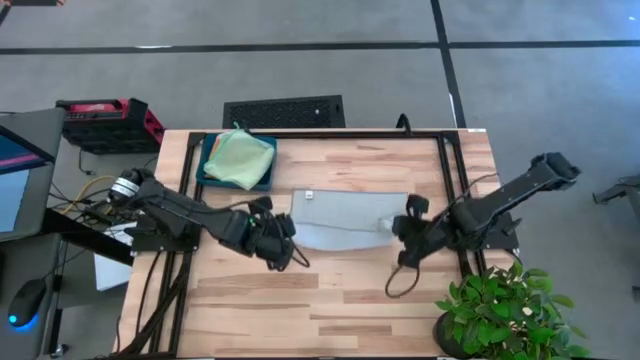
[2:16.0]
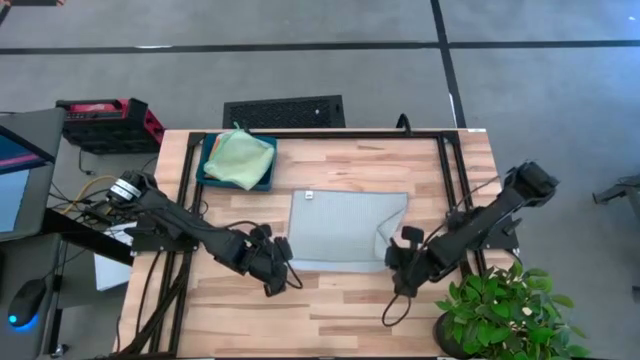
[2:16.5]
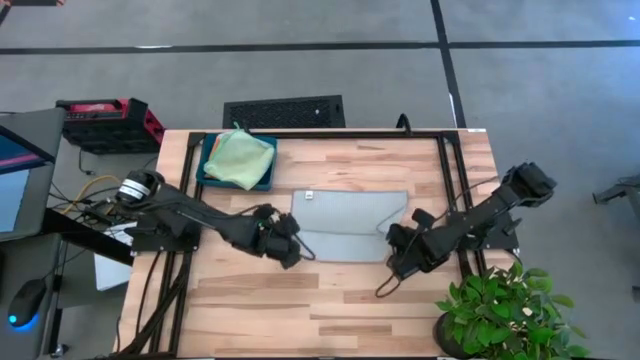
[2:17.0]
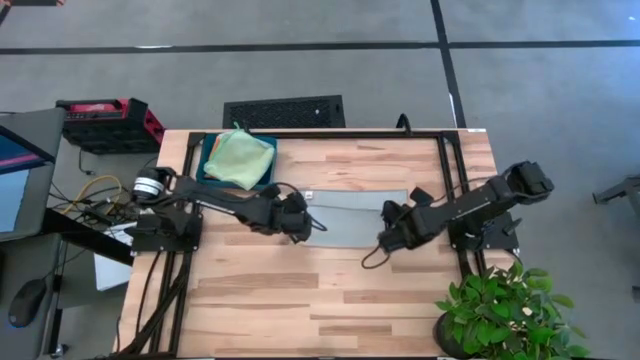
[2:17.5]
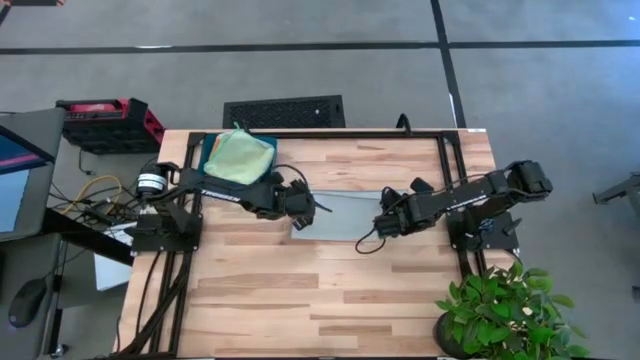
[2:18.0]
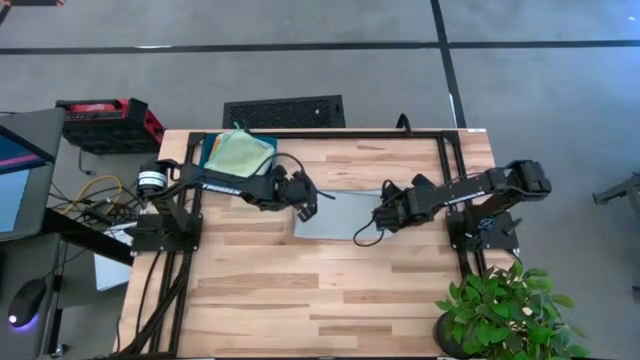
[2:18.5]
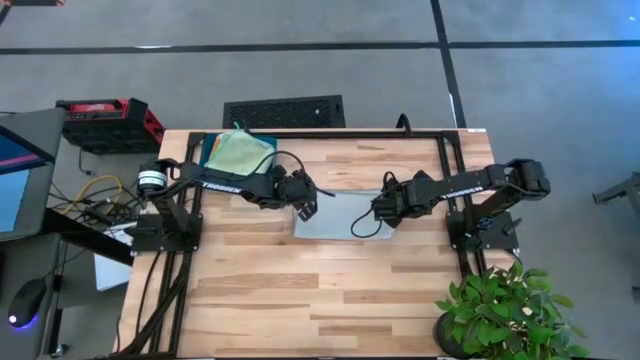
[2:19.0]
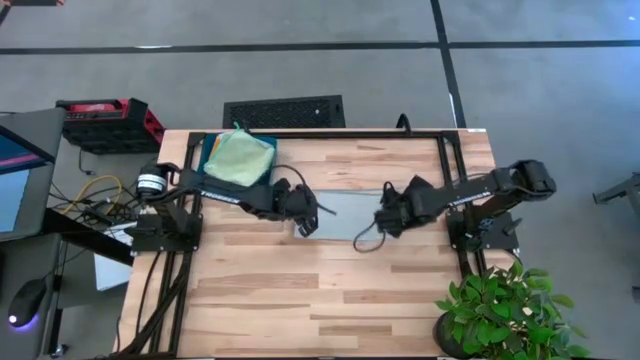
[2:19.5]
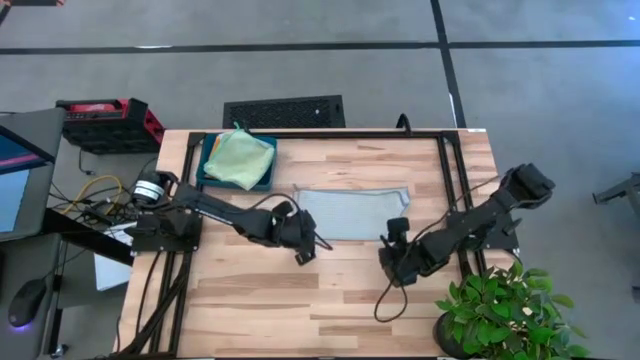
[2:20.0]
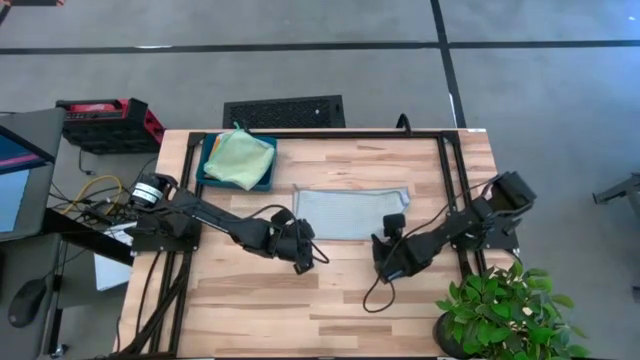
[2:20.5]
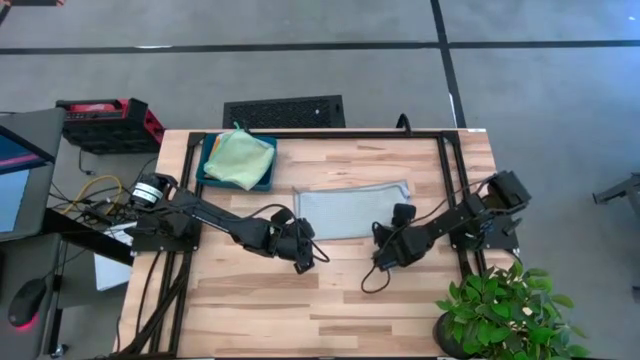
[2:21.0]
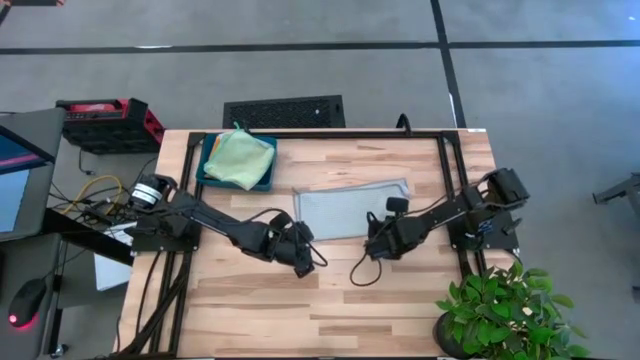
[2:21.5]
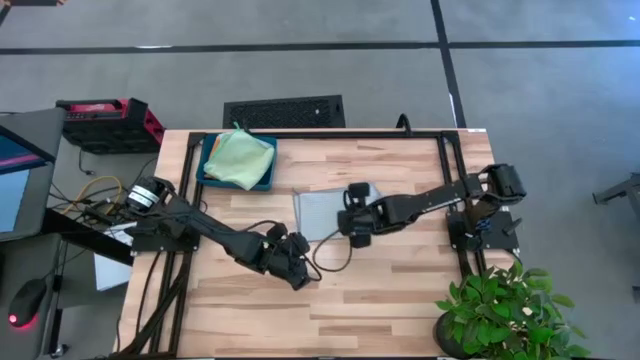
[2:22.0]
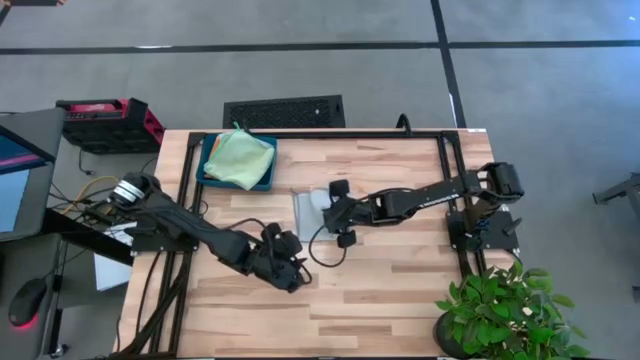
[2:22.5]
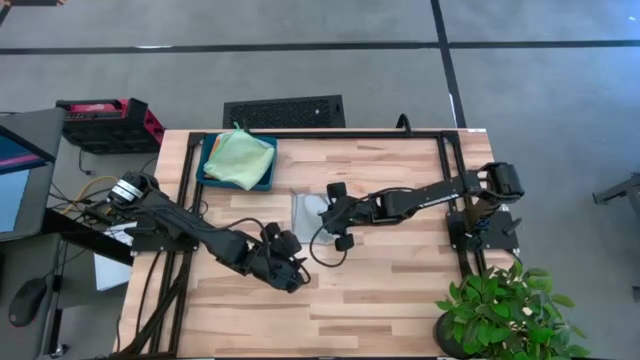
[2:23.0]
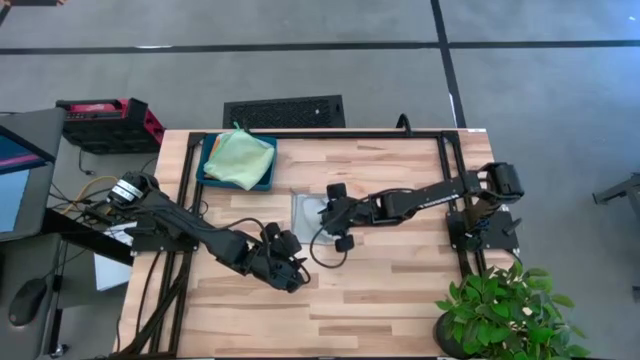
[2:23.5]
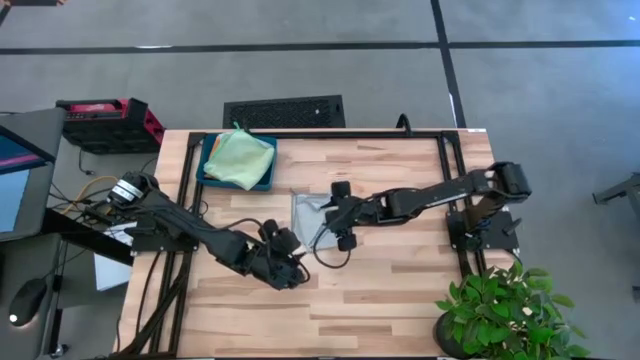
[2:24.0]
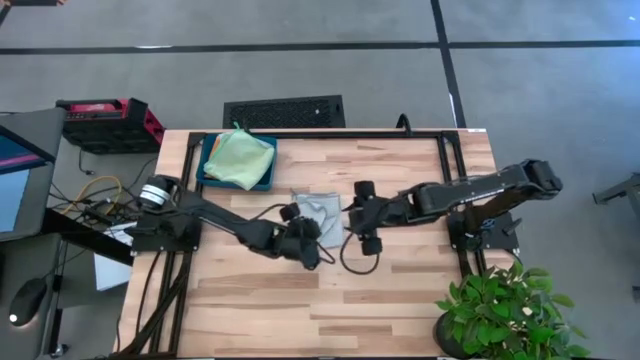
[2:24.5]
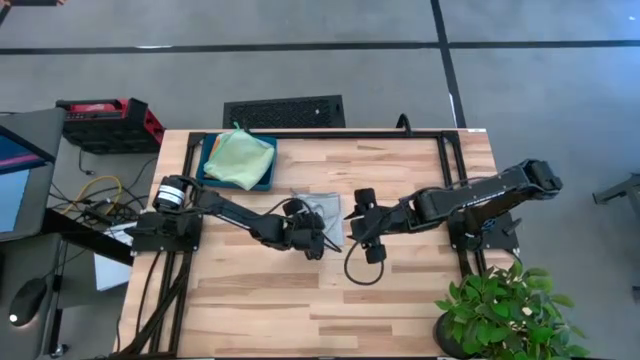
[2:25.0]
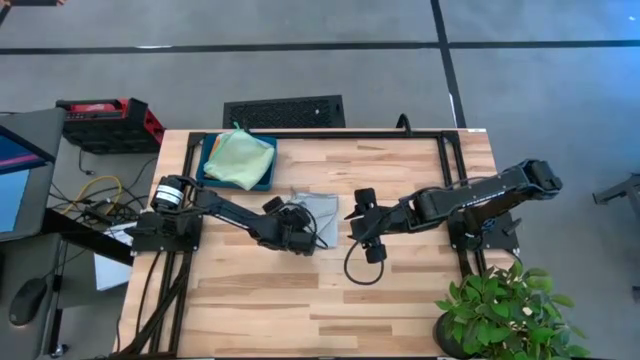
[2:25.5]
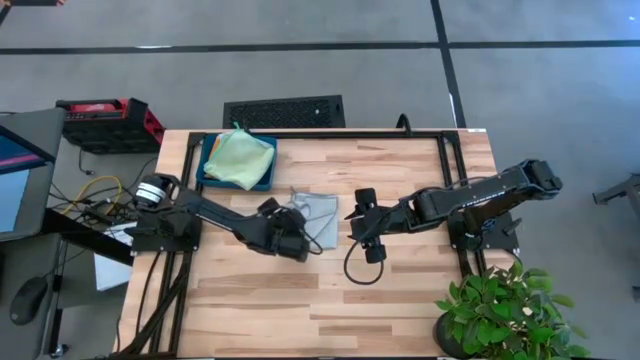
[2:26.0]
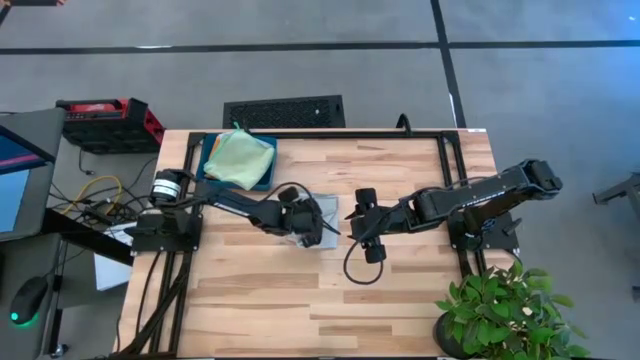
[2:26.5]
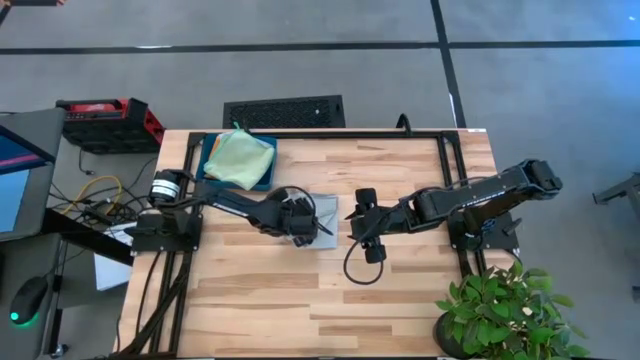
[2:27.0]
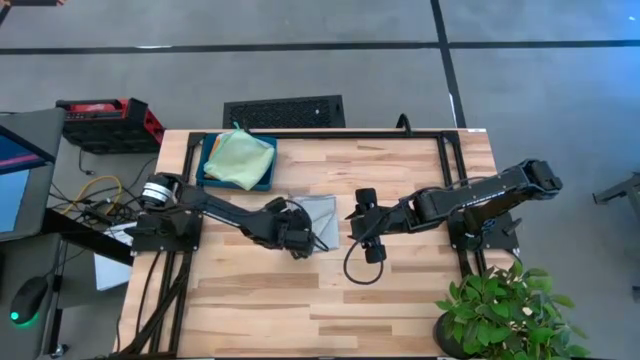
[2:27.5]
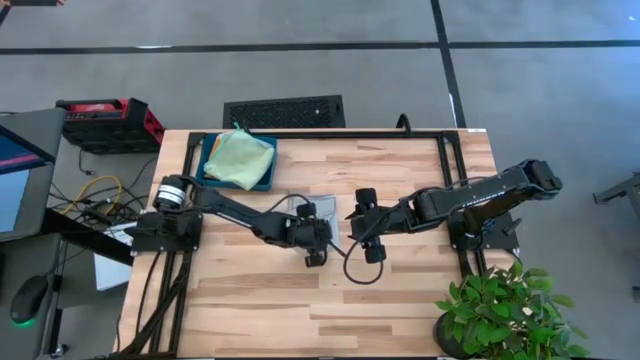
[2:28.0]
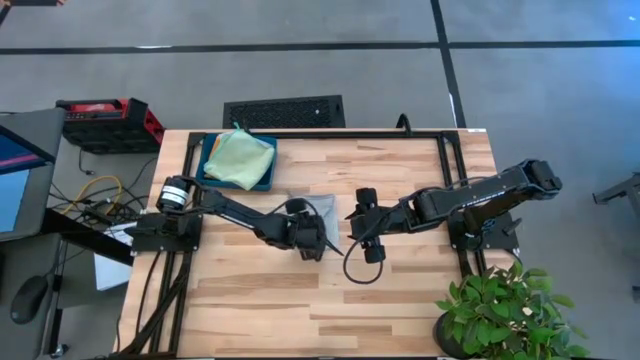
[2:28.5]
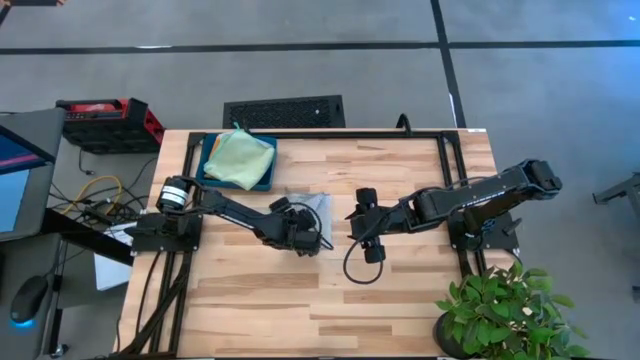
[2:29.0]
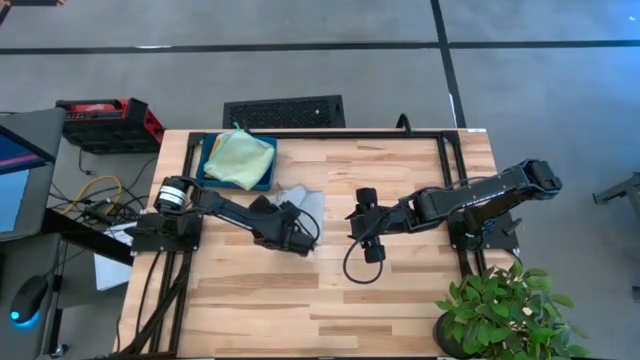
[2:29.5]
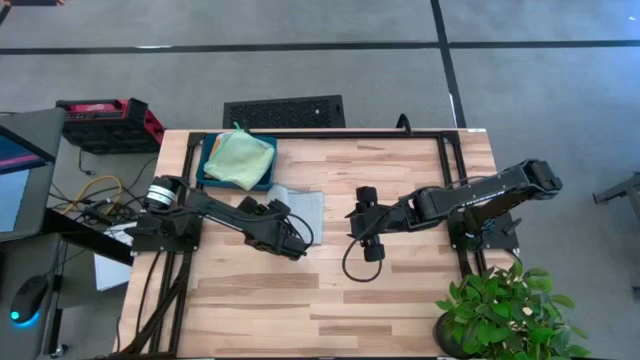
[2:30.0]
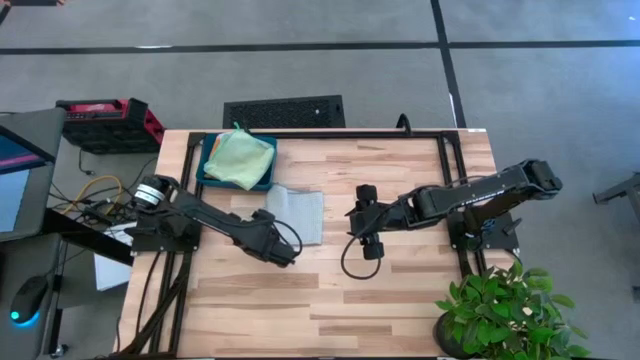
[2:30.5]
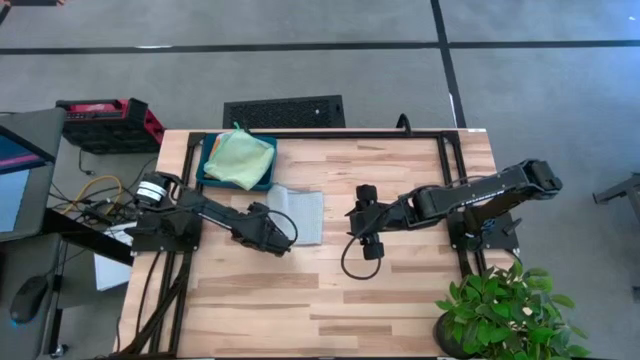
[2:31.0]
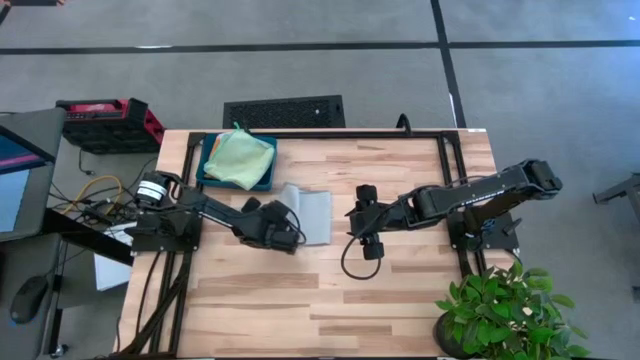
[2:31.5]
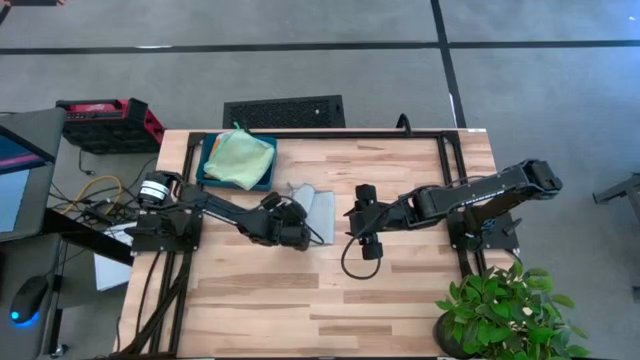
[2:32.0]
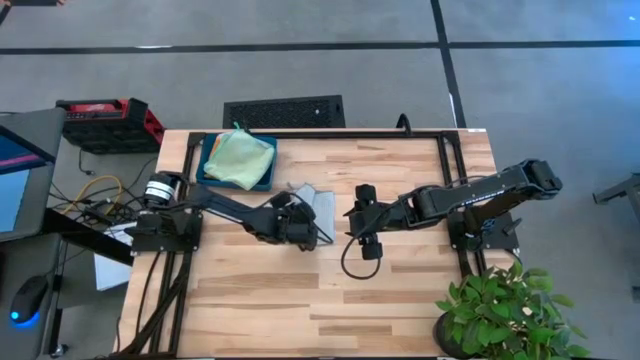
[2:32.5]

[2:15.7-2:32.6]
Task: Fold microfiber towels
Fold the gray towel

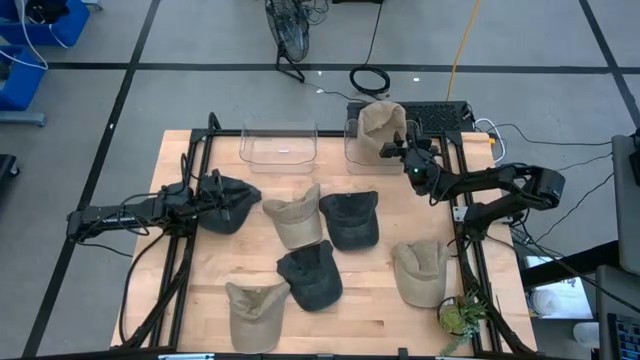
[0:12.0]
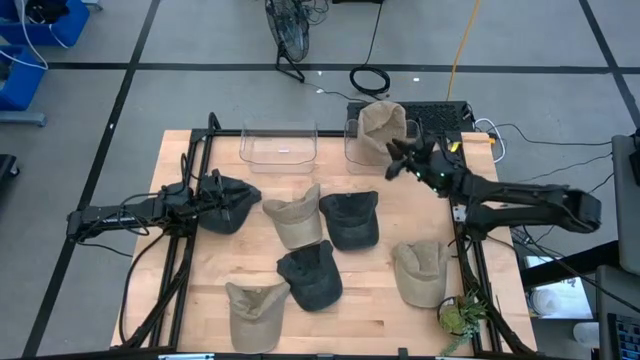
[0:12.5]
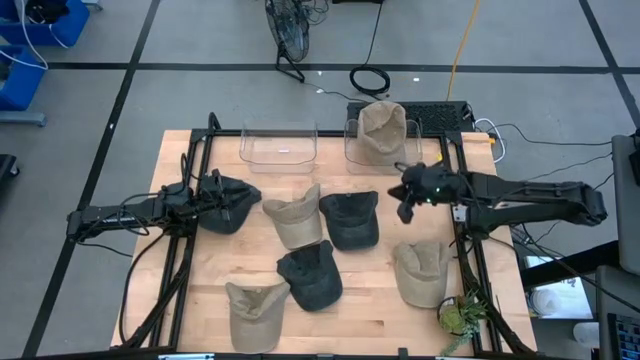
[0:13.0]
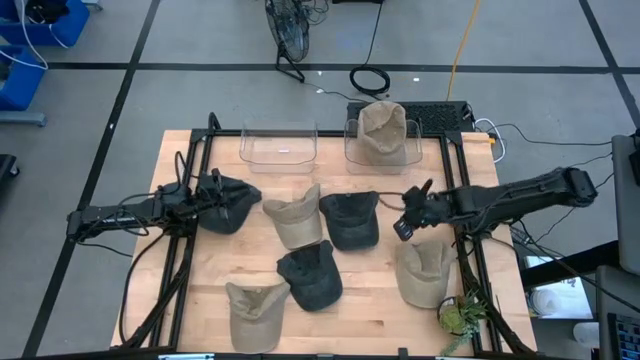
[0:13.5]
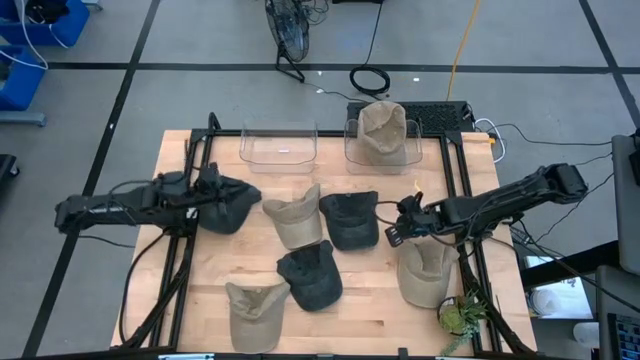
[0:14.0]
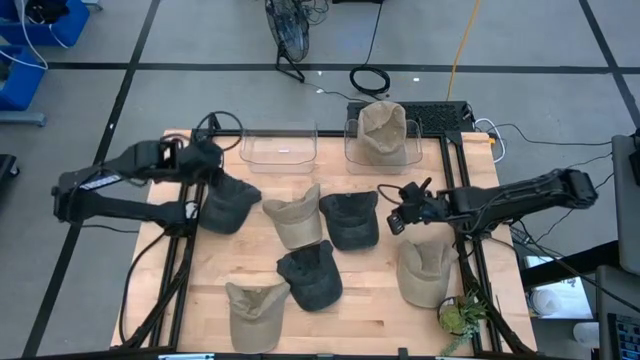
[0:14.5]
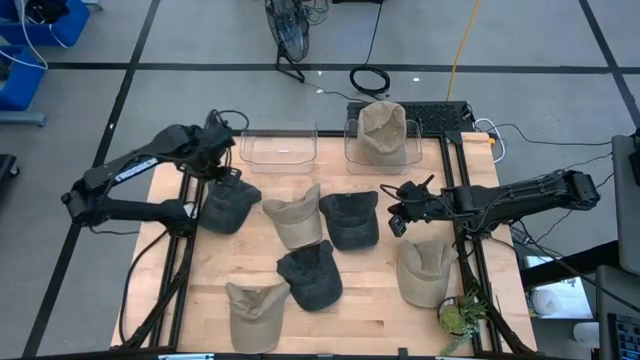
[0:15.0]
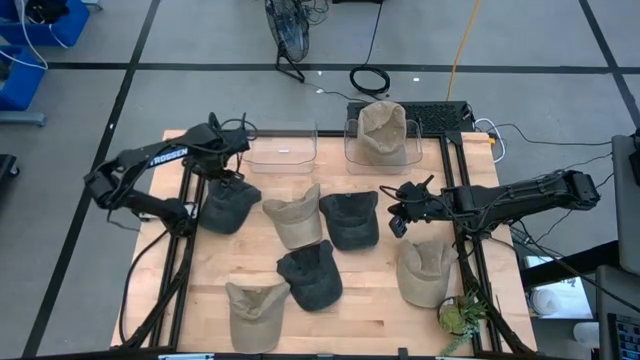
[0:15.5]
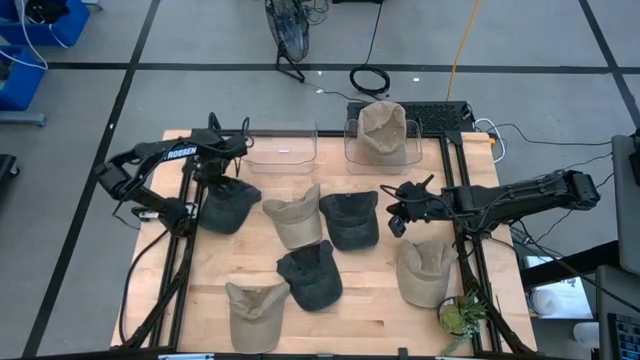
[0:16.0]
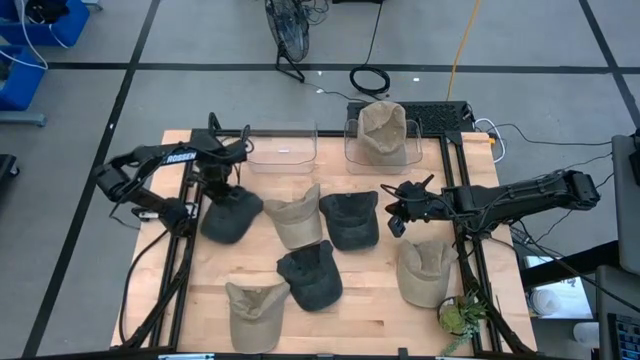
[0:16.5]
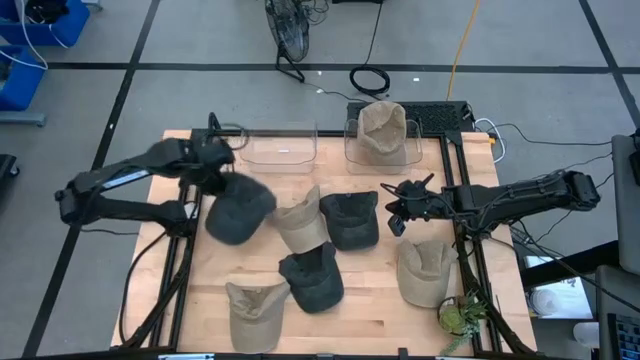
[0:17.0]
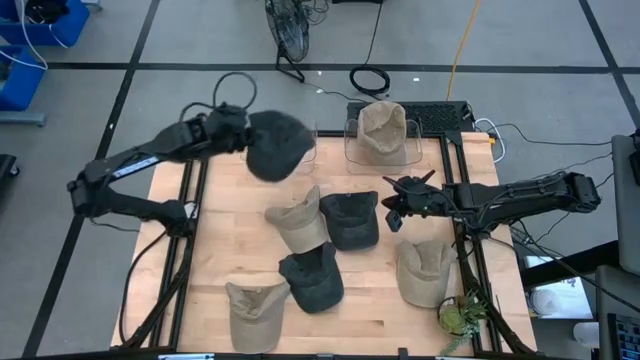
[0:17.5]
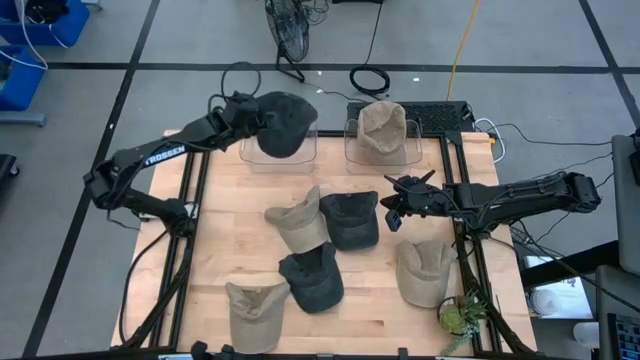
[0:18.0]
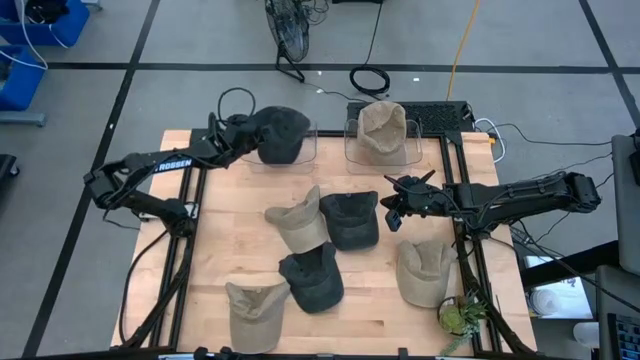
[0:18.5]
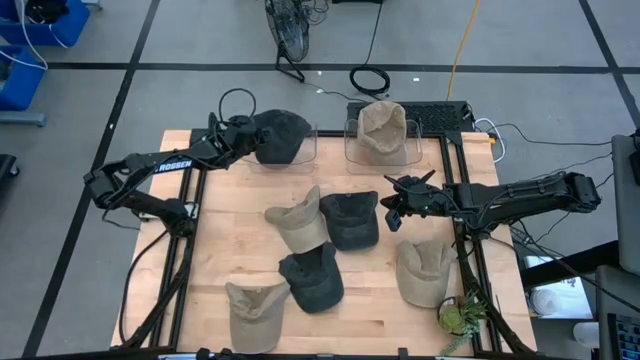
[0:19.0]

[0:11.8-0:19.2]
Task: Pick & Place hat
Put the black cap into the left transparent bin
